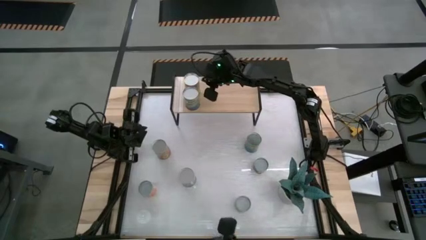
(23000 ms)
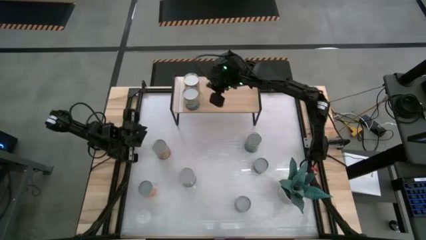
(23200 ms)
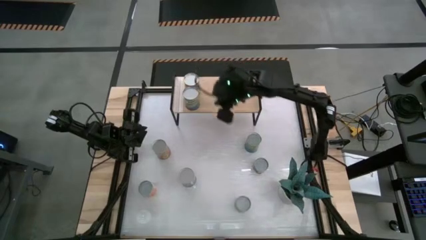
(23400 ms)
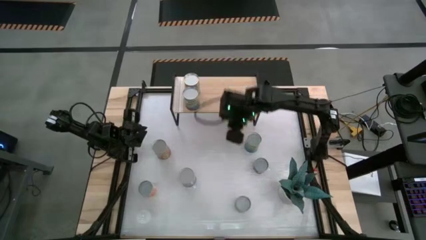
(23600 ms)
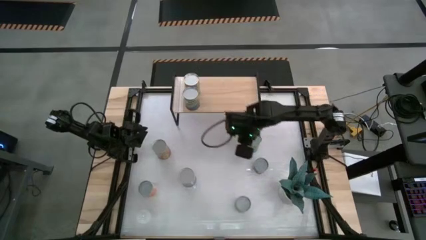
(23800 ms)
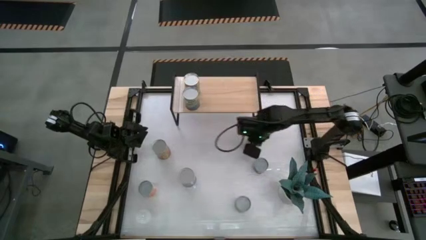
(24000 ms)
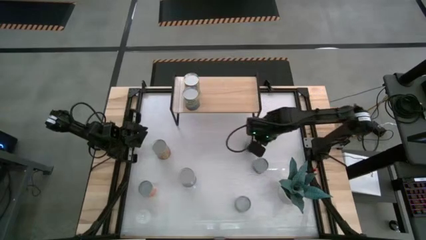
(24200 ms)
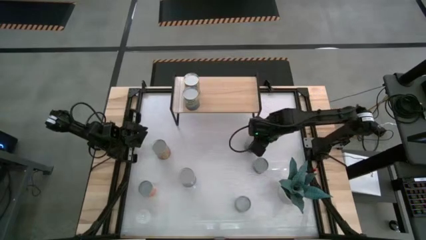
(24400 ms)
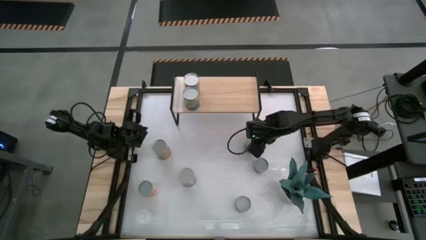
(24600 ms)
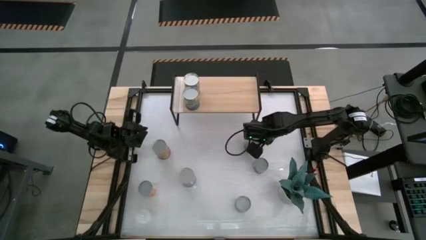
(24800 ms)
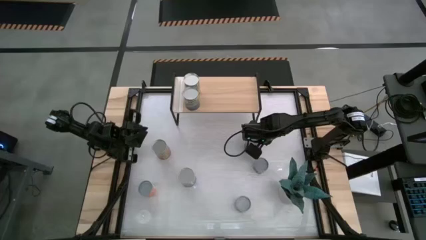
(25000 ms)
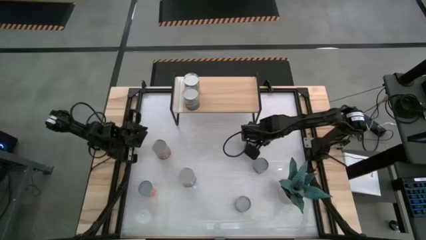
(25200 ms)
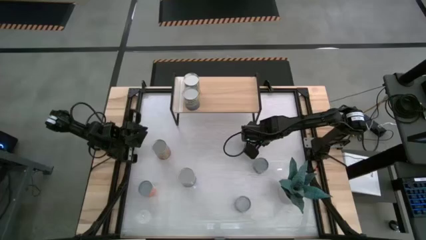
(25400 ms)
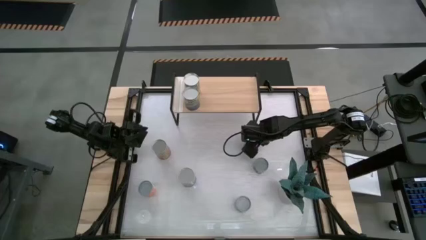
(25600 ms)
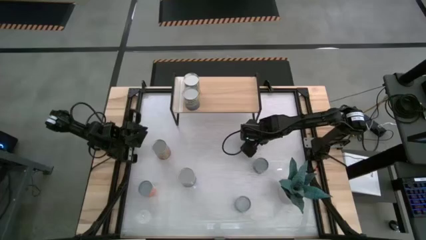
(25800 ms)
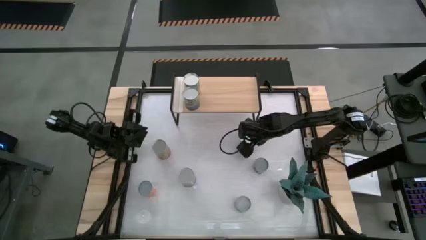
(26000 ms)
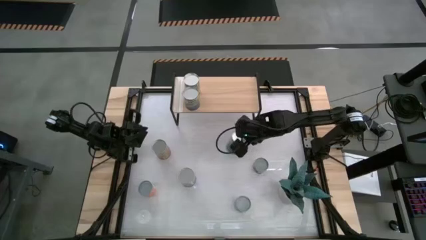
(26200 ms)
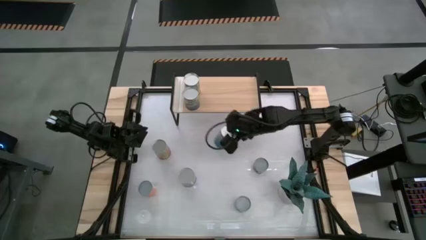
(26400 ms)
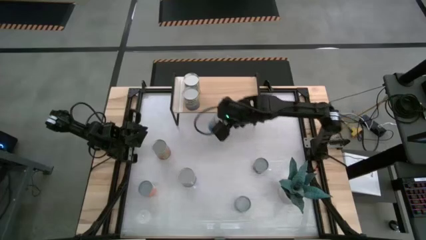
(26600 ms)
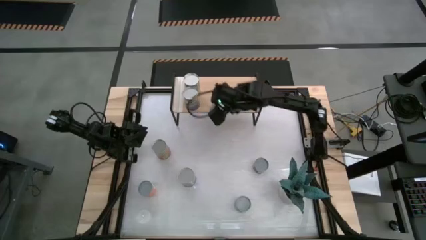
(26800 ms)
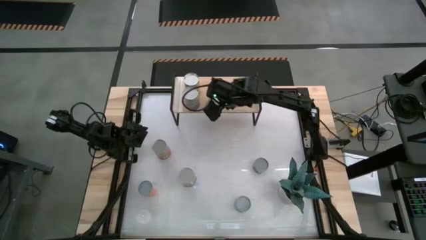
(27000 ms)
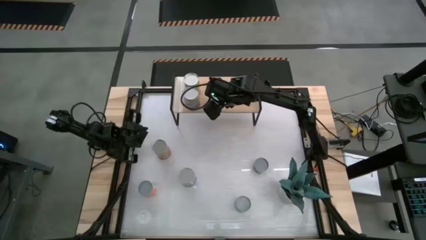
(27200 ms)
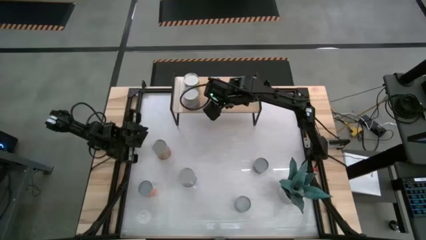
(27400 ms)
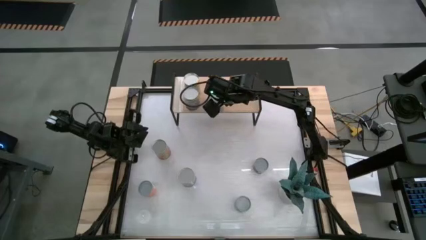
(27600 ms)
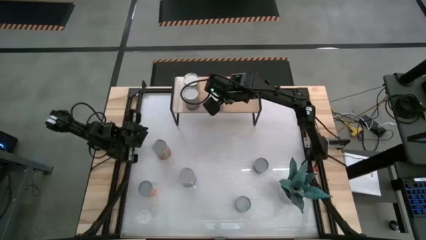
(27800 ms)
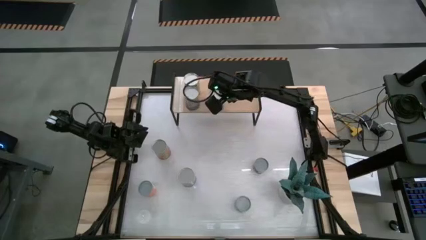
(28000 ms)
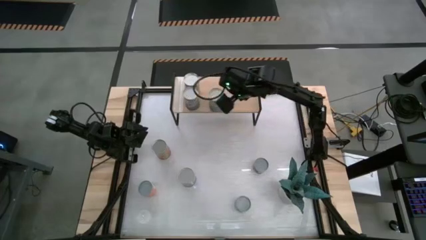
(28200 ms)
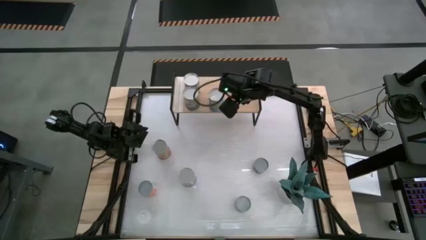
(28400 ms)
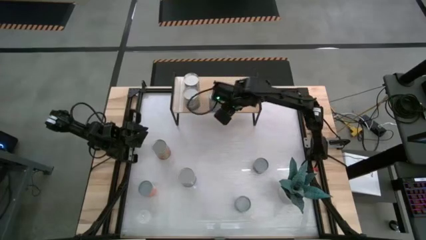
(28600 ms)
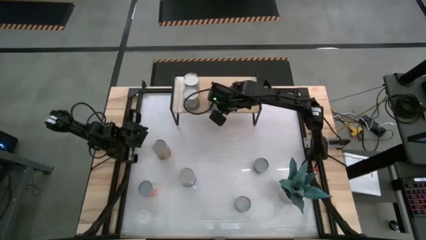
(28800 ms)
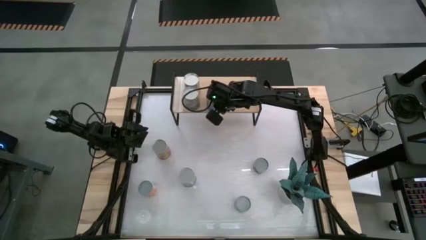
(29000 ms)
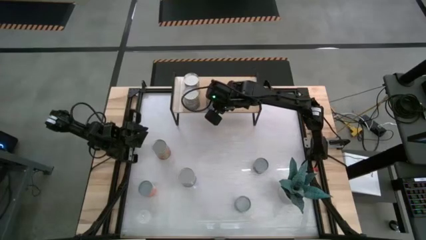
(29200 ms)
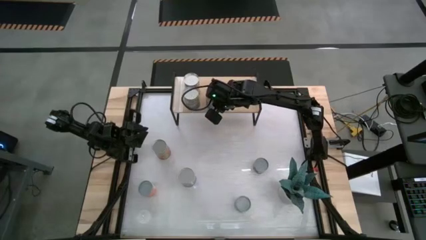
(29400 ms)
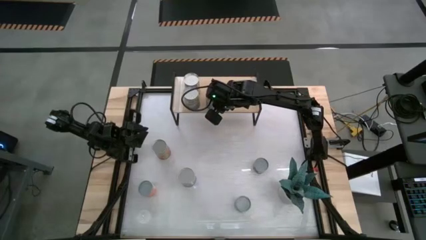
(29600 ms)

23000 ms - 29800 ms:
Task: Pick and place cans onto a shelf
Put the canned cherries on the shelf

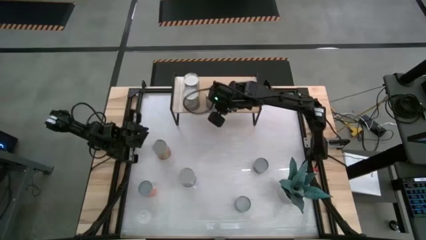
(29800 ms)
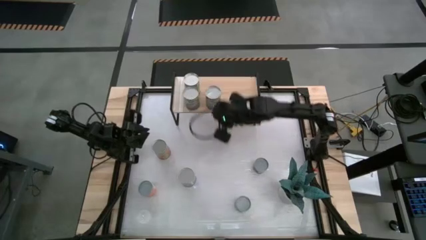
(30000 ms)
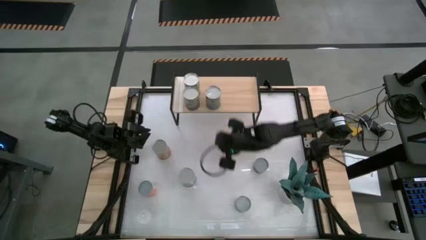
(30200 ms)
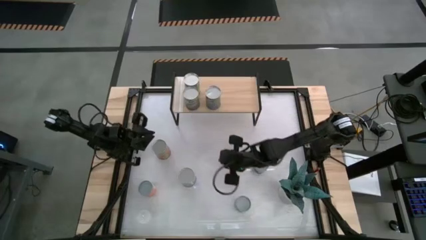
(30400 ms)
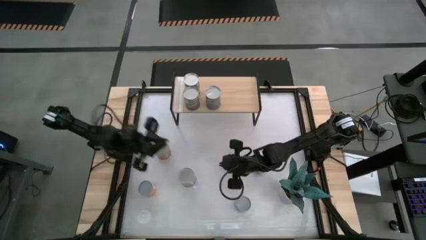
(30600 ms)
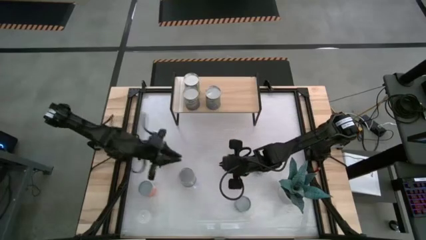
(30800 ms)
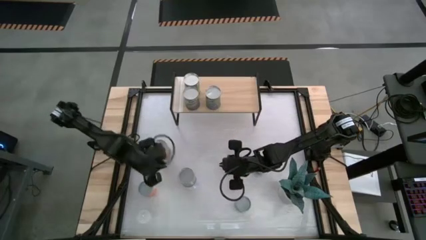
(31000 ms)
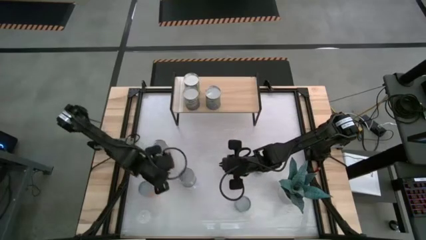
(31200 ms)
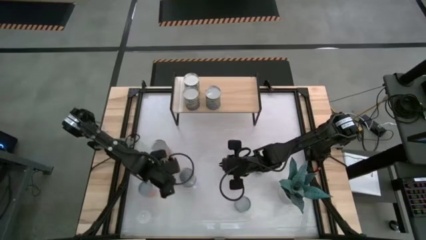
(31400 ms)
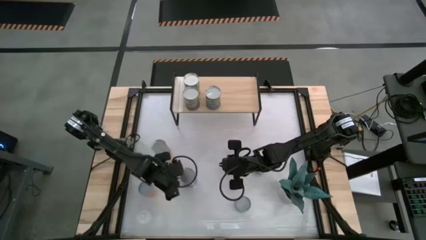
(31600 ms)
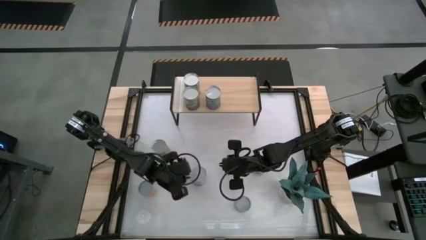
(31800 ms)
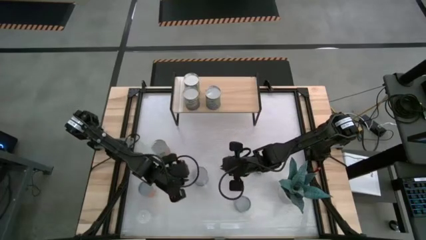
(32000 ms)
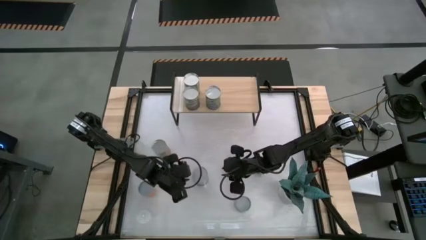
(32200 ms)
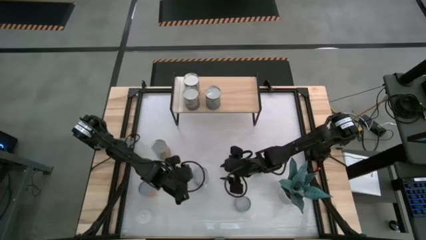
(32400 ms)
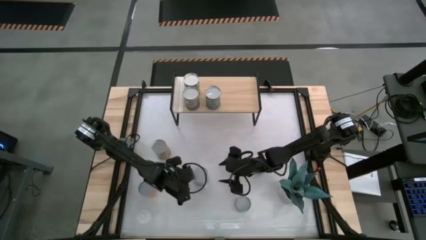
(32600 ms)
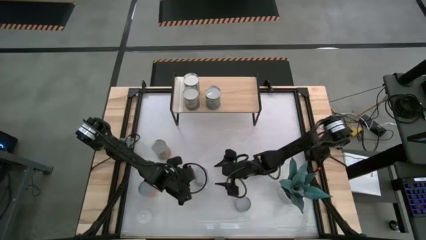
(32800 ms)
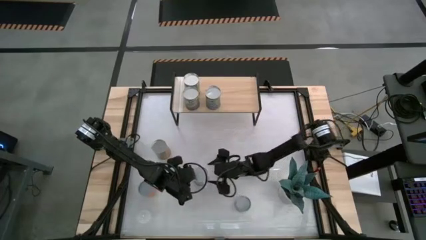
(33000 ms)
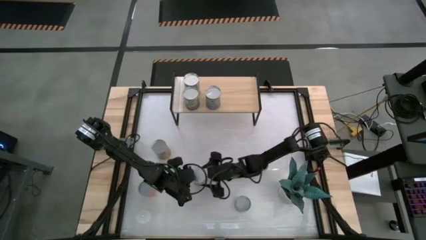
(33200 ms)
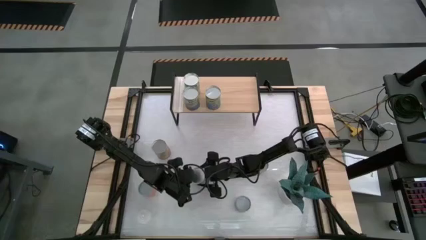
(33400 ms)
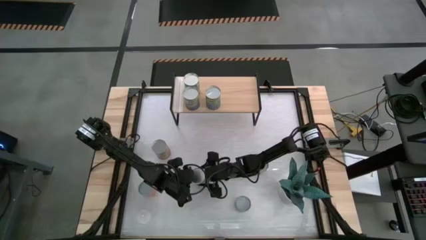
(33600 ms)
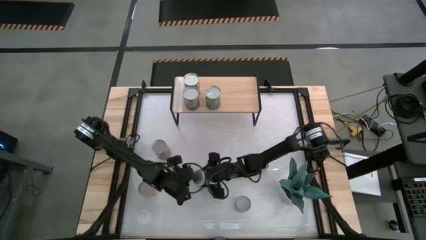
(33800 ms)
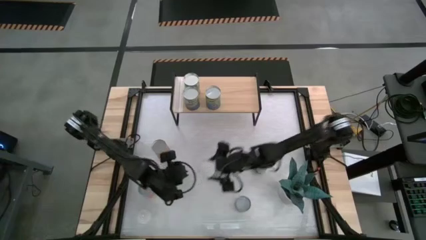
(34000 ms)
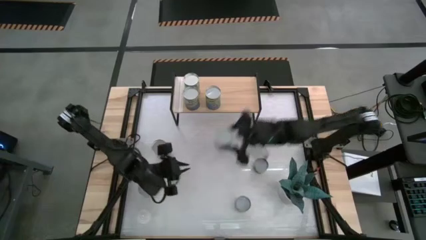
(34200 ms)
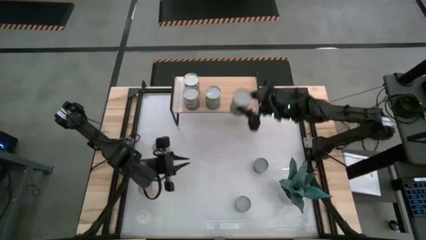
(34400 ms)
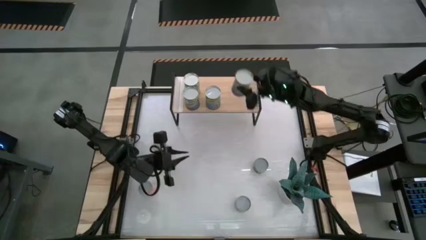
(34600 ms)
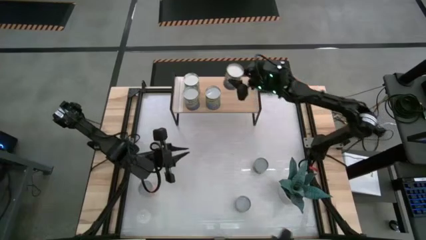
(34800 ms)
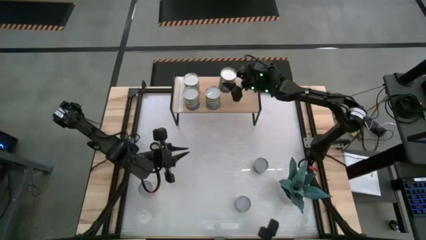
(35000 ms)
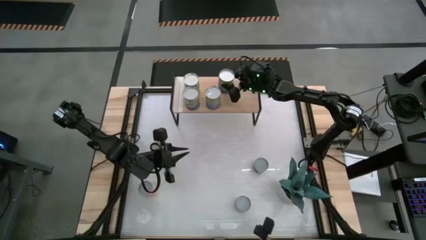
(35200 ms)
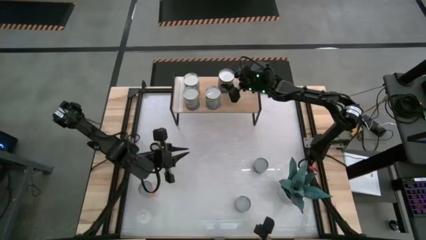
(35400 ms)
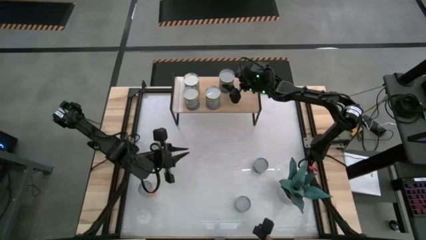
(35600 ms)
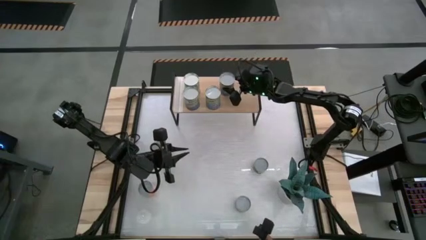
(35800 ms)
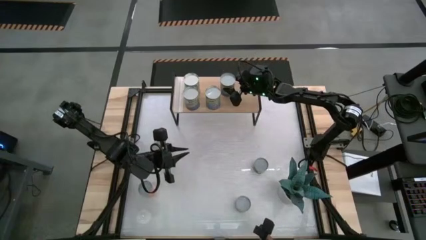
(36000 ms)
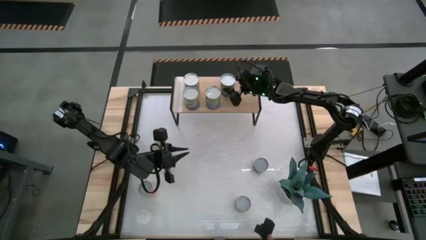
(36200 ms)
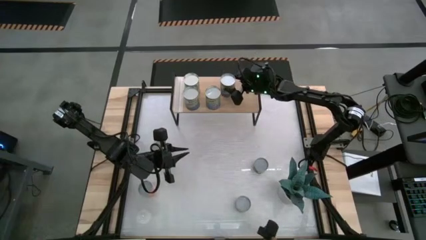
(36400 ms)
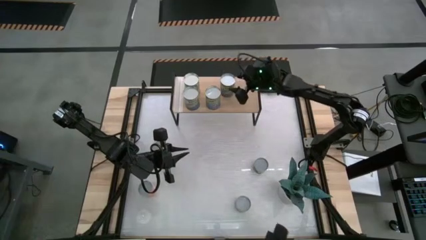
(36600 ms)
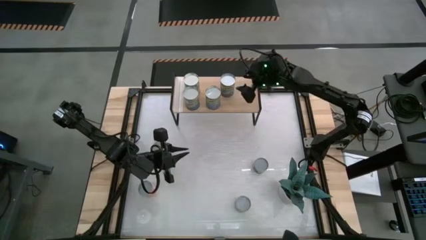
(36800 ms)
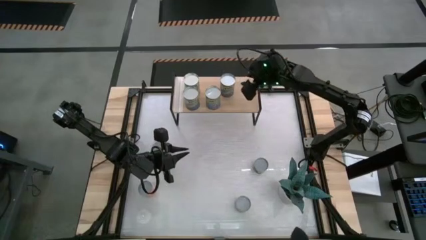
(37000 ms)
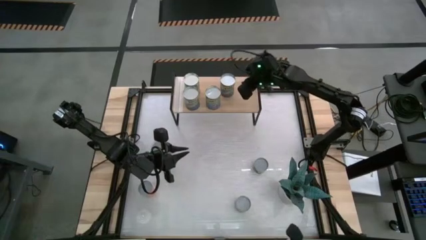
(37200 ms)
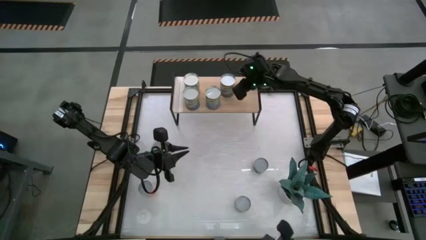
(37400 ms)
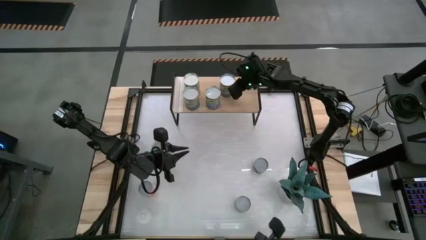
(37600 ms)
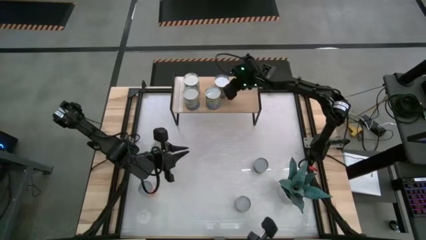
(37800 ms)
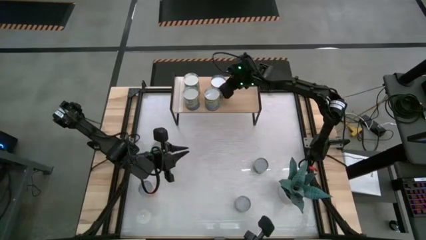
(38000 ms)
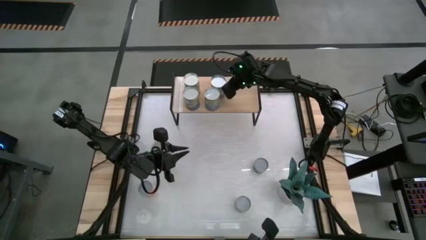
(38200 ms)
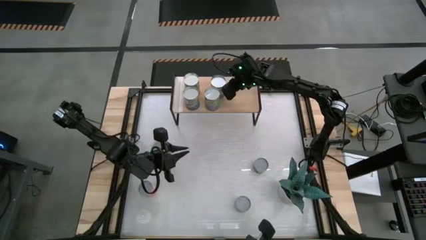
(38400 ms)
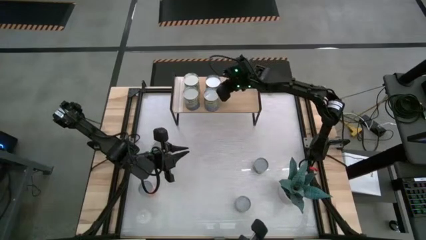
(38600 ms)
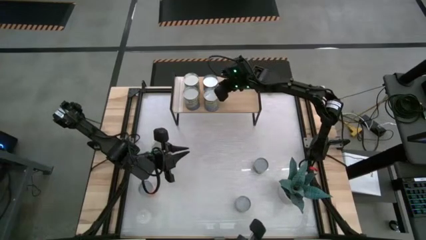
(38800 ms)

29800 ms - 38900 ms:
Put the large canned peas on the shelf

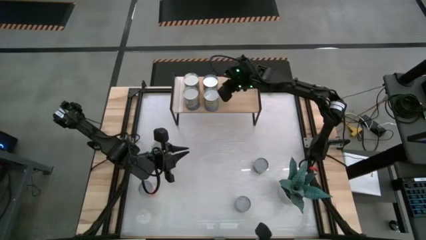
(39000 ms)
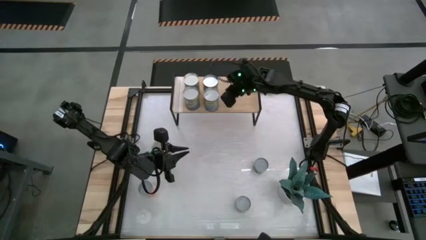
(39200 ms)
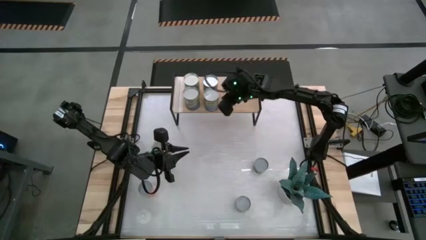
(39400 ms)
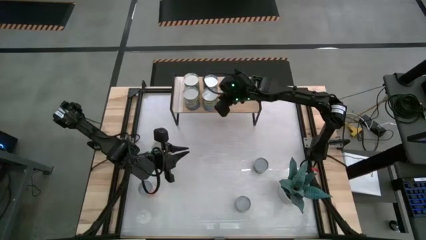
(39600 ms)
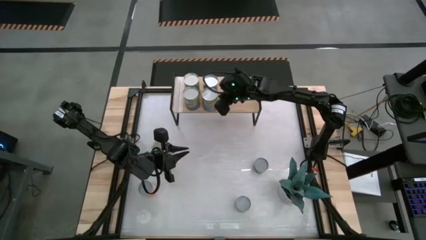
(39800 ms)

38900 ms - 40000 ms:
Adjust the canned cherries on the shelf
